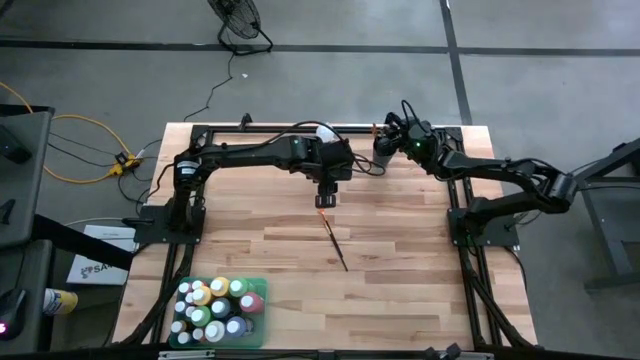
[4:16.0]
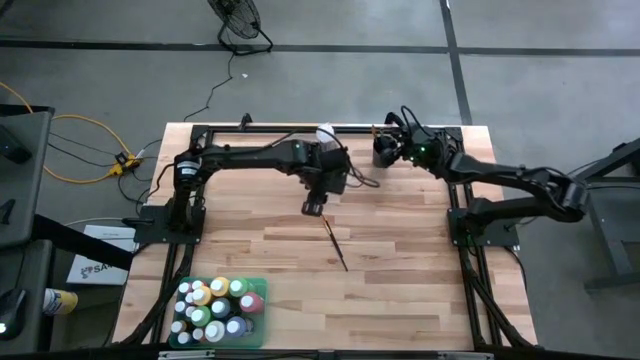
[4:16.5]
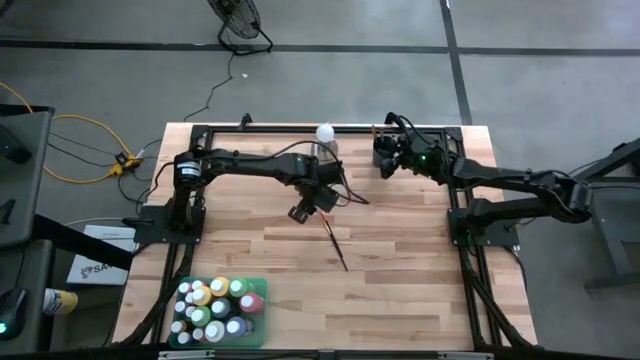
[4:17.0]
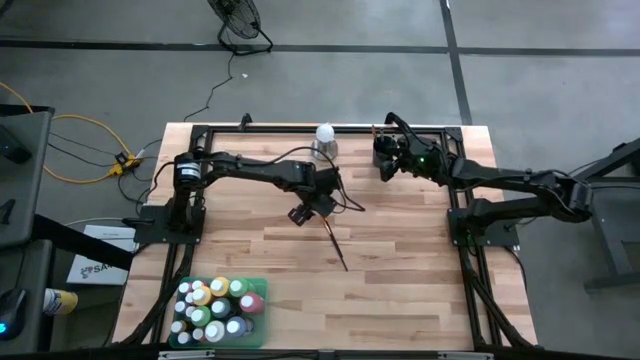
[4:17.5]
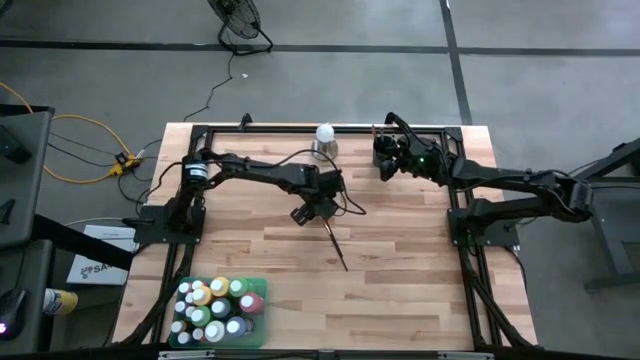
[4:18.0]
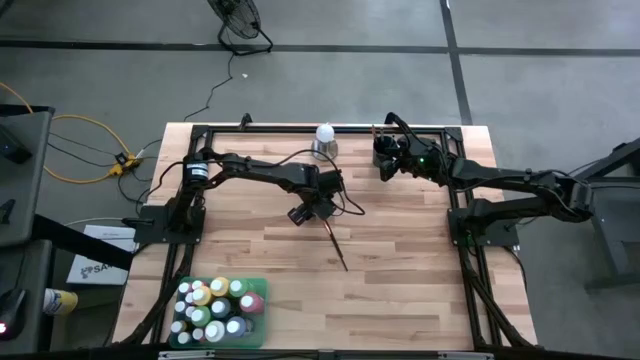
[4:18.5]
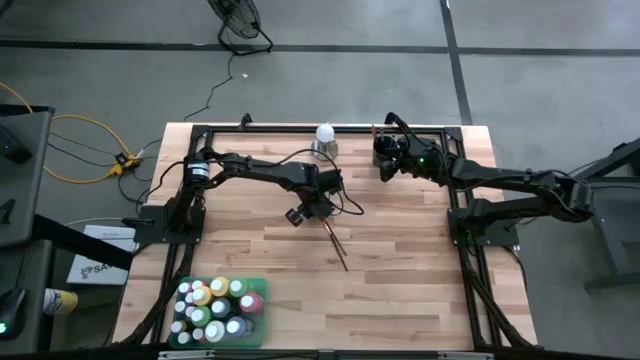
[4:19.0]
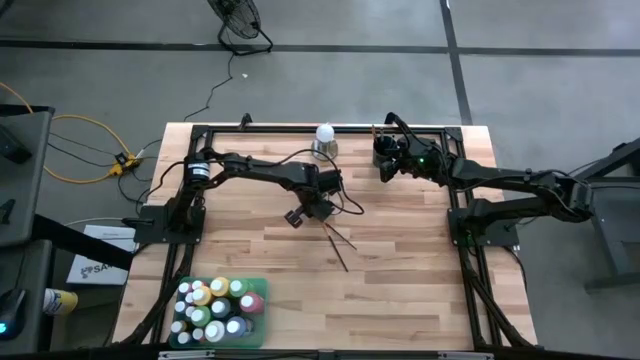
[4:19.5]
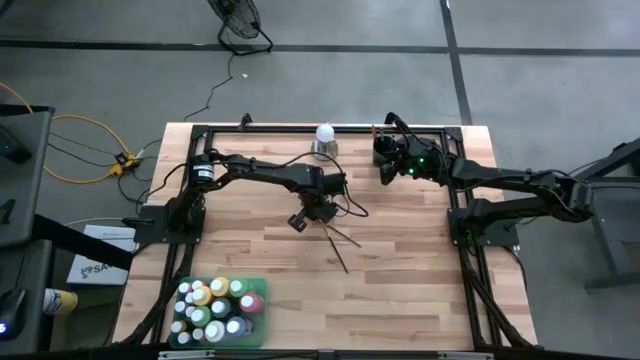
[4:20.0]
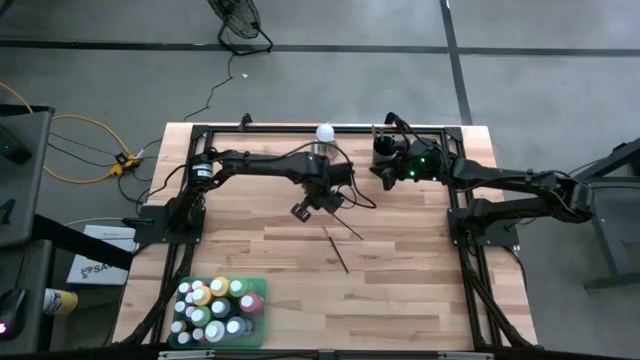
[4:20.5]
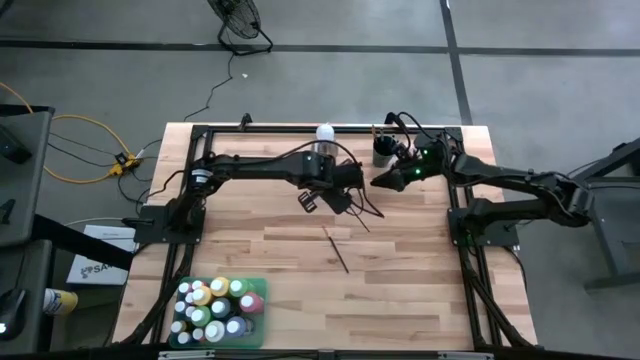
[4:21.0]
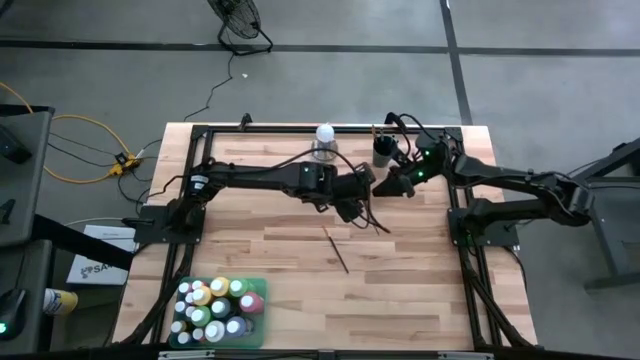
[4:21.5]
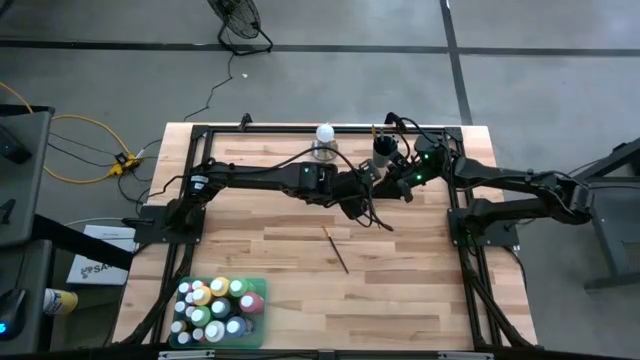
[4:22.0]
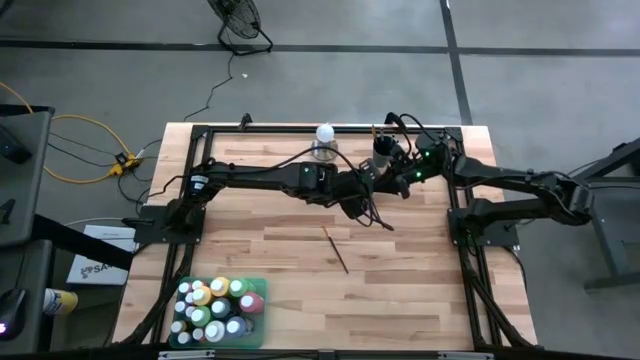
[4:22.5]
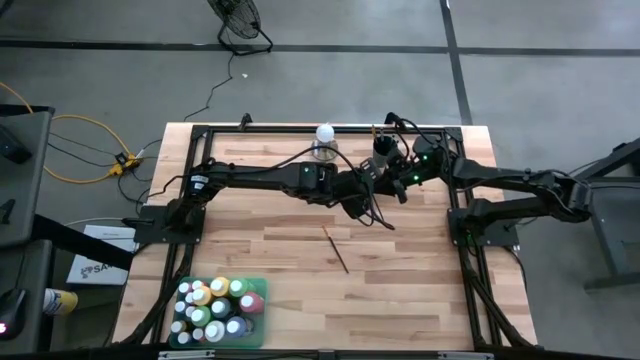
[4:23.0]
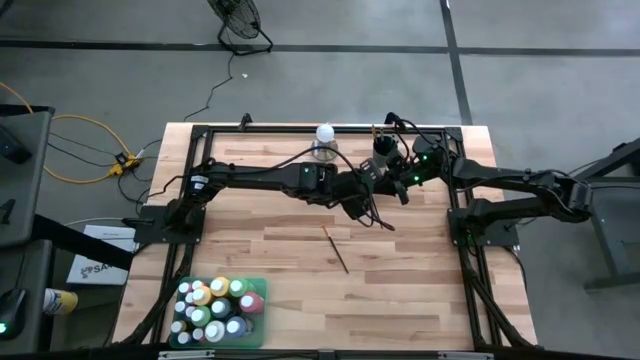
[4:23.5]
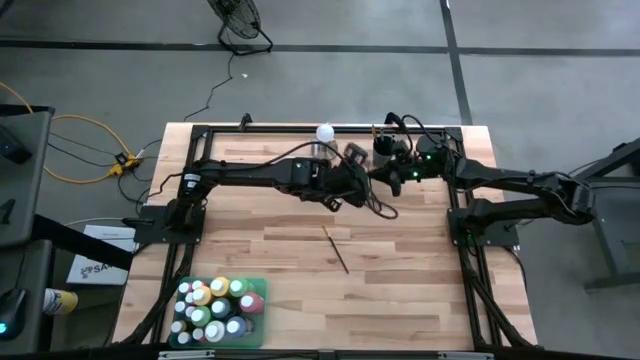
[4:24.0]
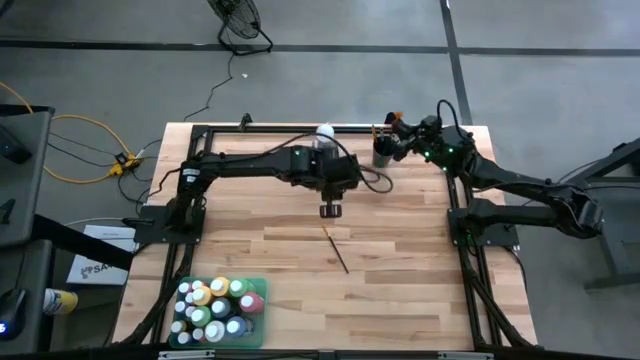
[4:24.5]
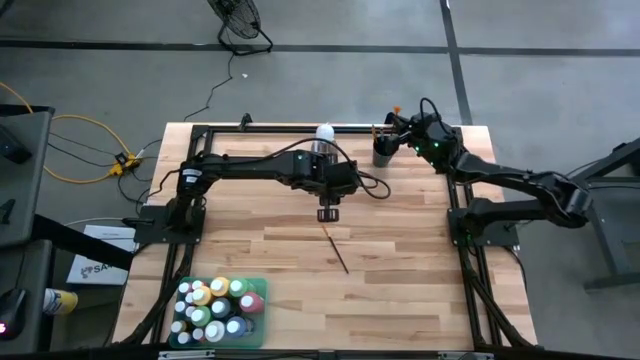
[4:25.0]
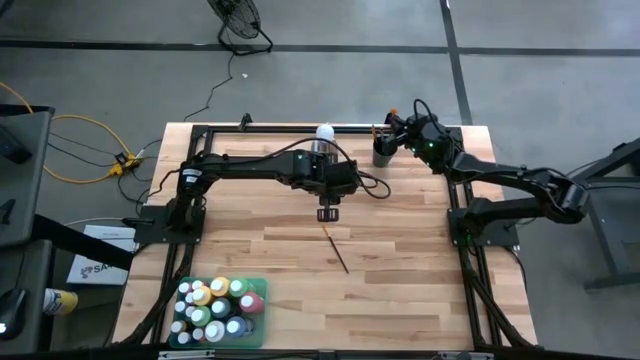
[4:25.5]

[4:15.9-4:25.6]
Task: Pick & Place Paint Supplies
Put the gold paint brush into the black cup

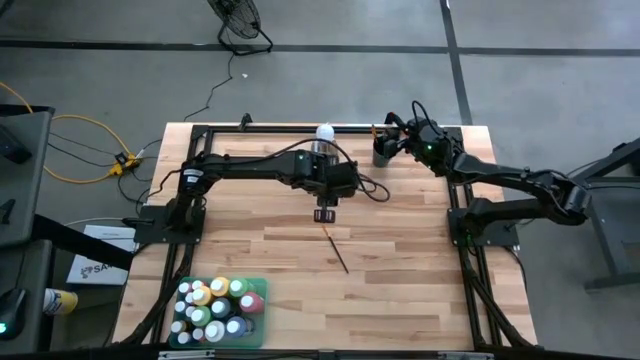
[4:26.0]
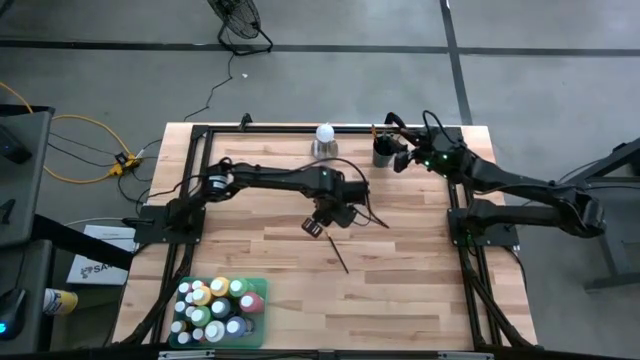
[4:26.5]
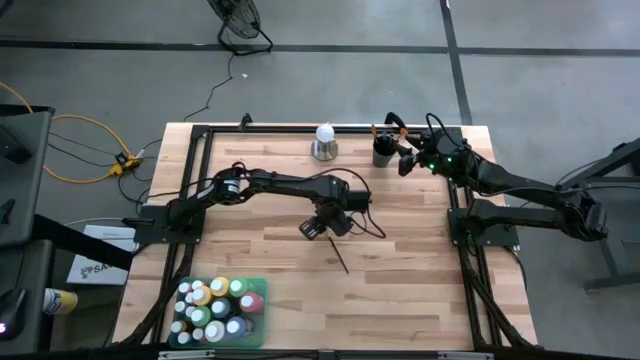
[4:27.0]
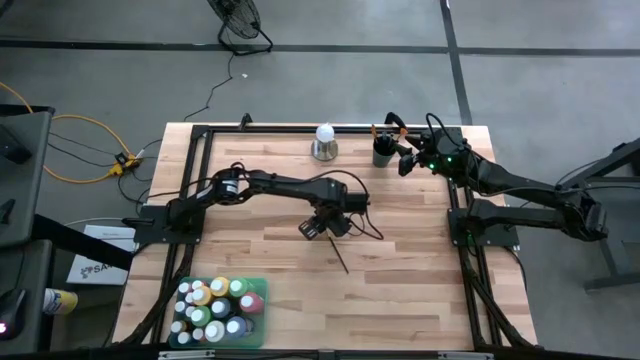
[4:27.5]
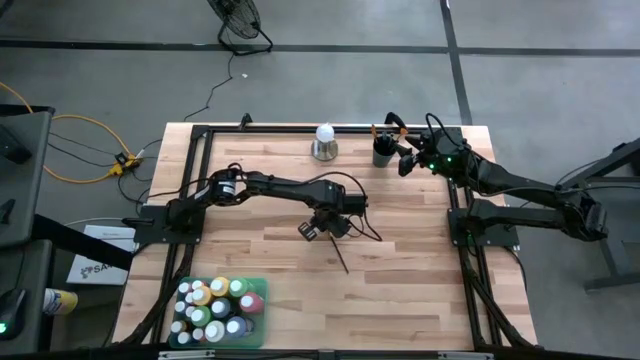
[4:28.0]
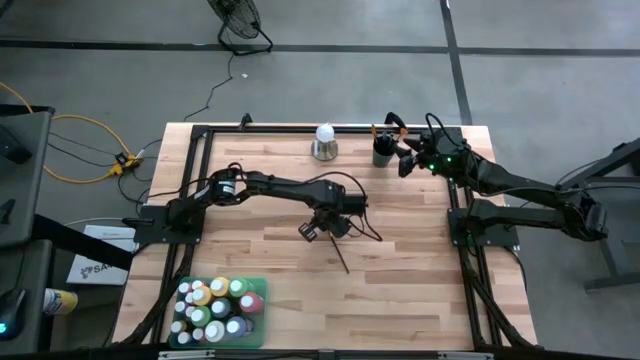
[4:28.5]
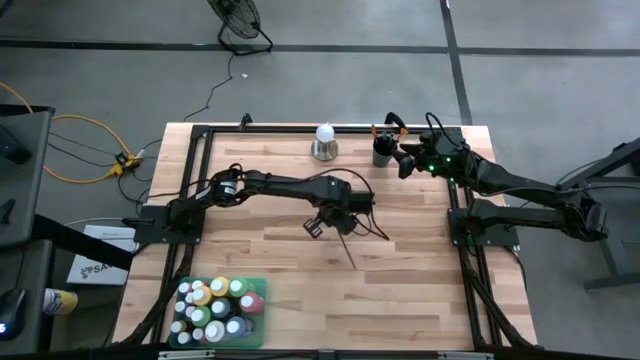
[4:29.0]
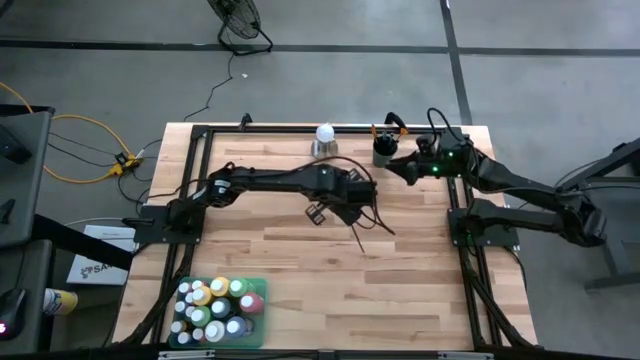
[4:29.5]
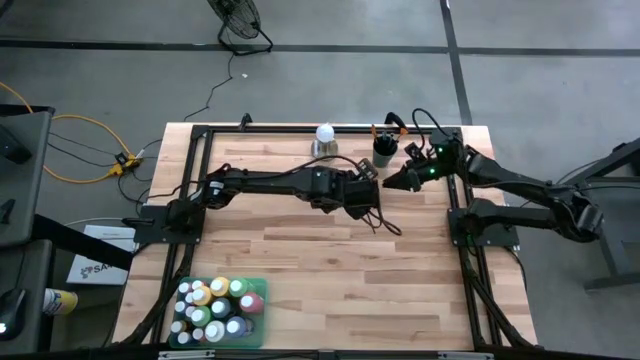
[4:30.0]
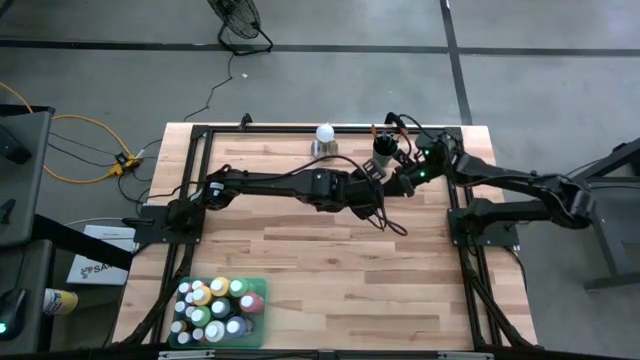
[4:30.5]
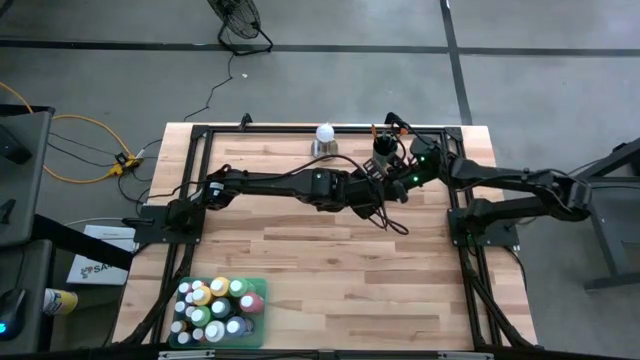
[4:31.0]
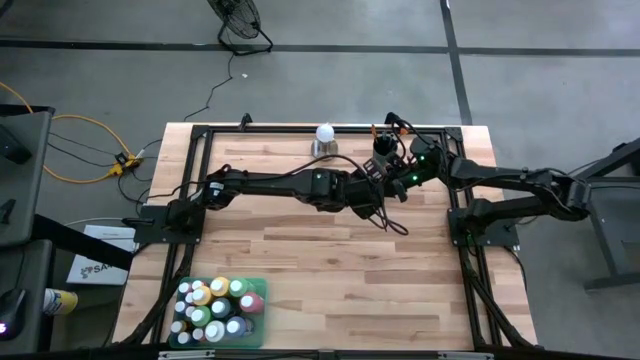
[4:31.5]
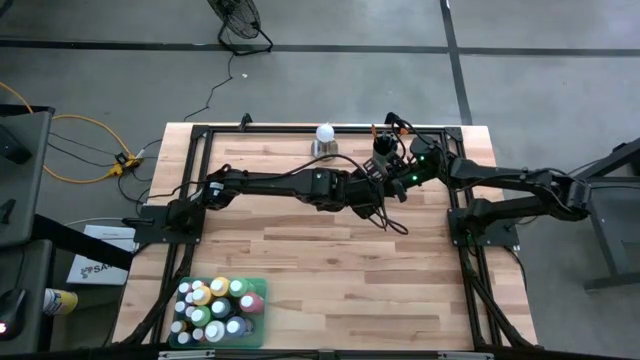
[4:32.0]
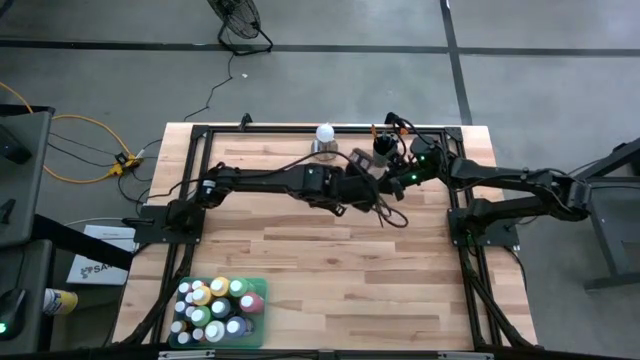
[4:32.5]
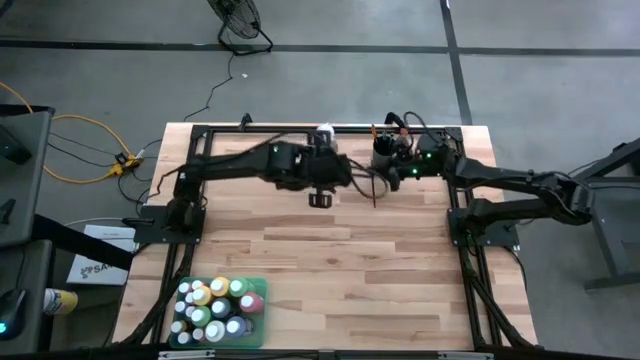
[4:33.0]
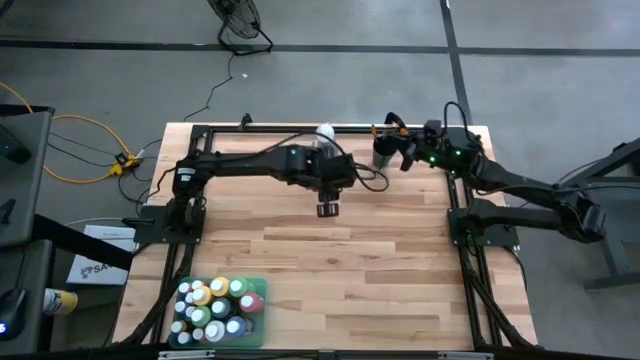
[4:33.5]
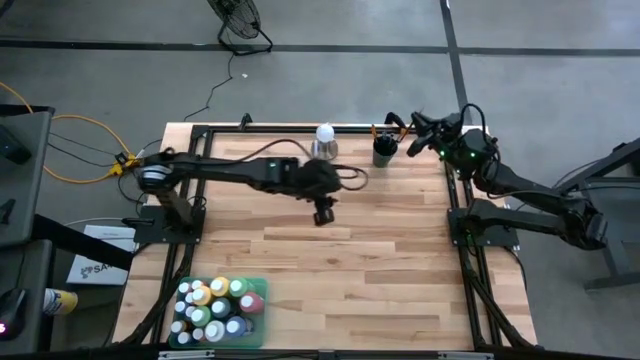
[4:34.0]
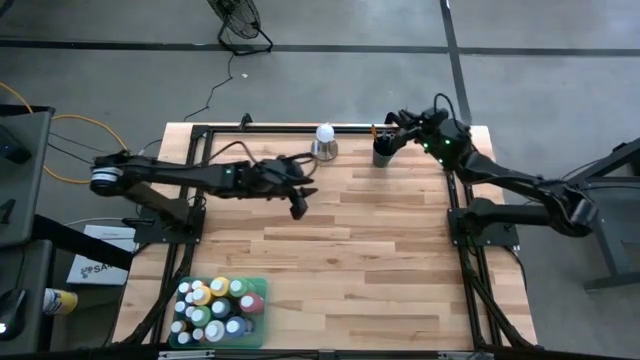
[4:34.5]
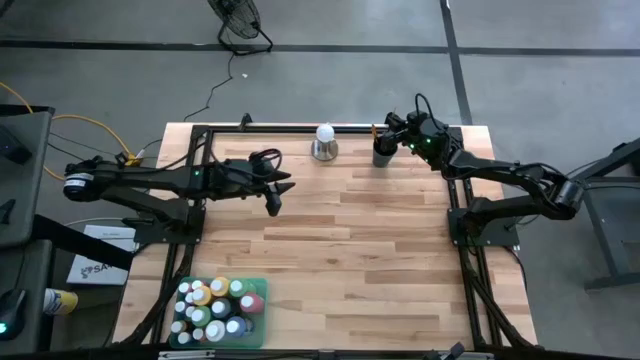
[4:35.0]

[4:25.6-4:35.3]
Put the gold paint brush into the black cup

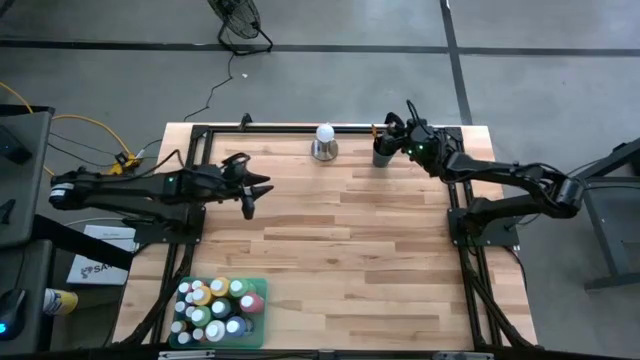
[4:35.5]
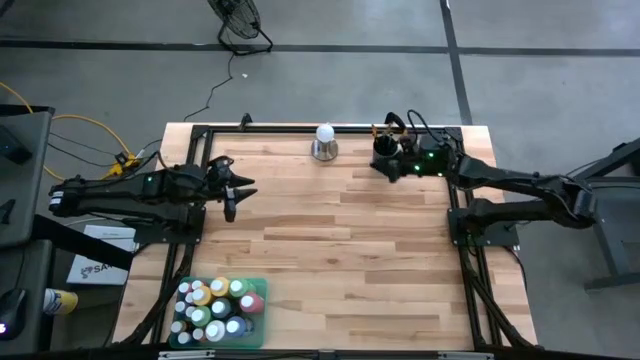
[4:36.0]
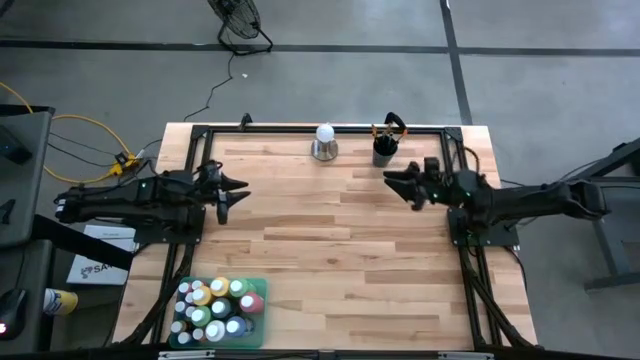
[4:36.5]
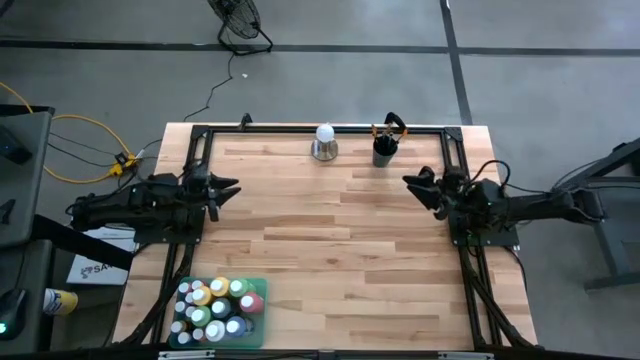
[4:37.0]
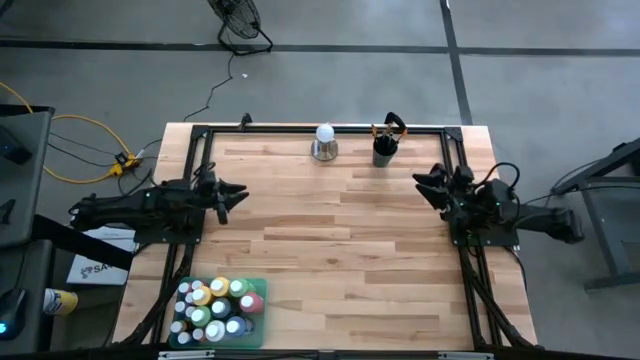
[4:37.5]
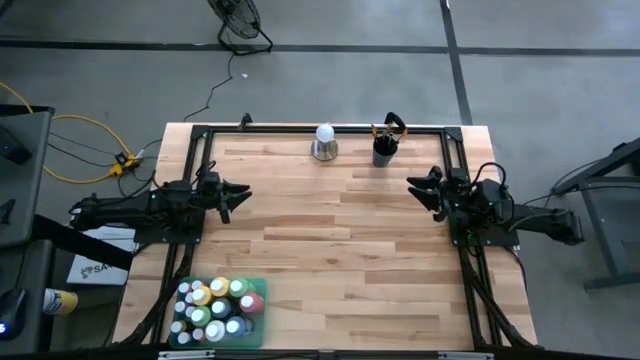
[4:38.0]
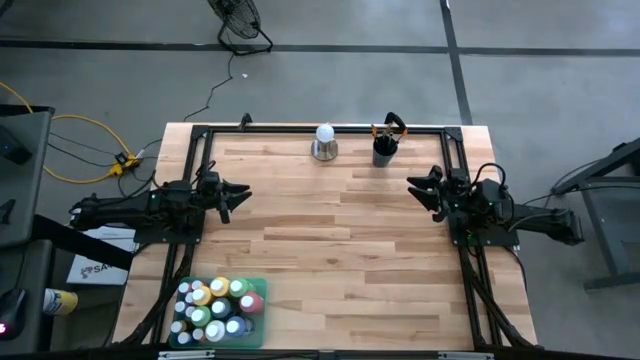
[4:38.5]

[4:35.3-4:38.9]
Return to Home Position
